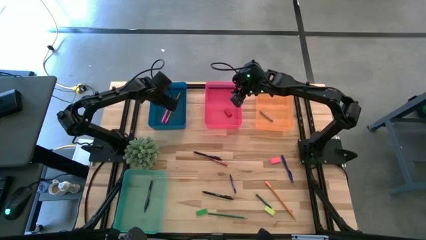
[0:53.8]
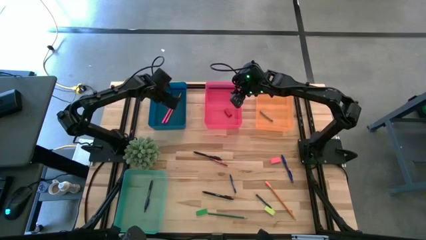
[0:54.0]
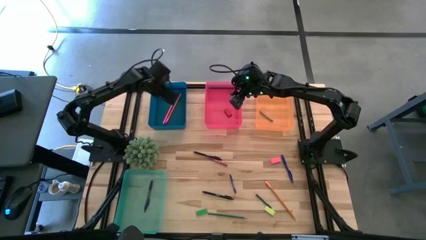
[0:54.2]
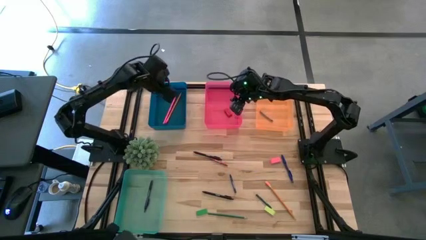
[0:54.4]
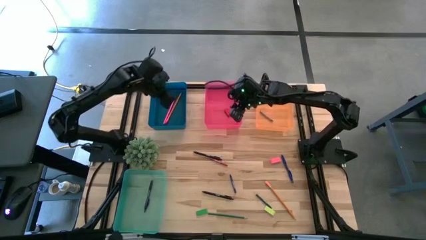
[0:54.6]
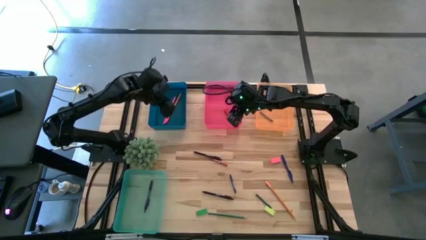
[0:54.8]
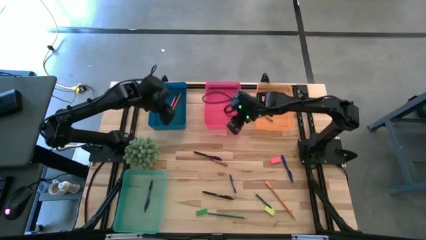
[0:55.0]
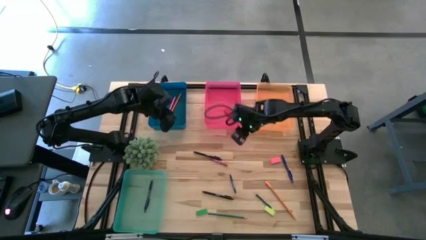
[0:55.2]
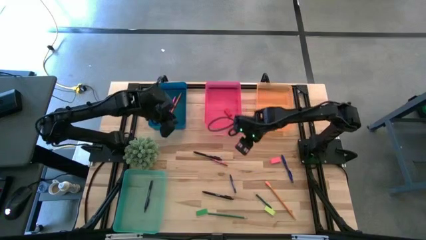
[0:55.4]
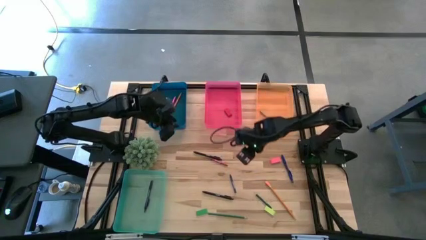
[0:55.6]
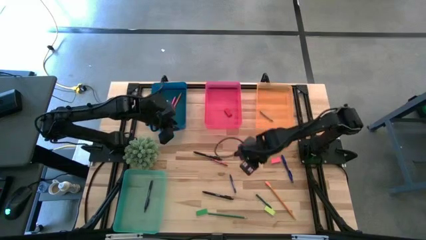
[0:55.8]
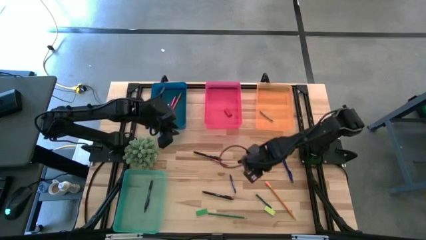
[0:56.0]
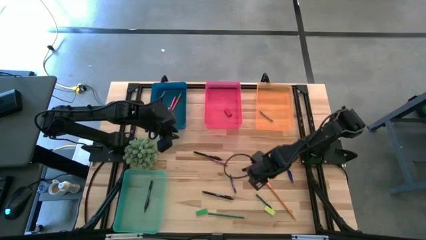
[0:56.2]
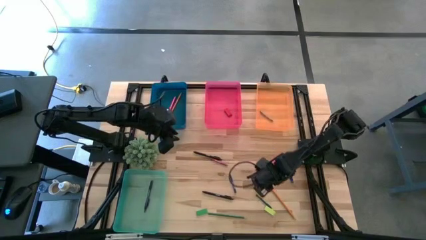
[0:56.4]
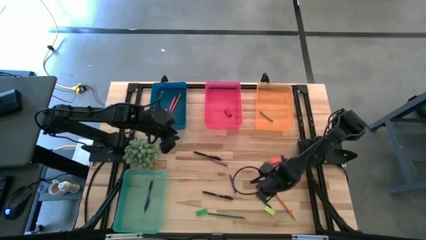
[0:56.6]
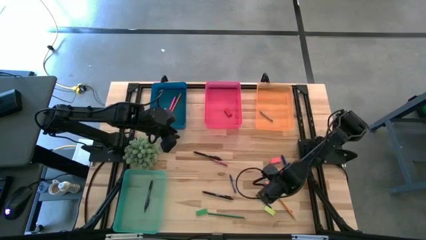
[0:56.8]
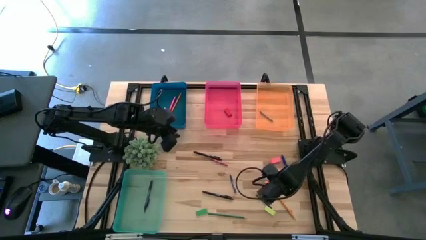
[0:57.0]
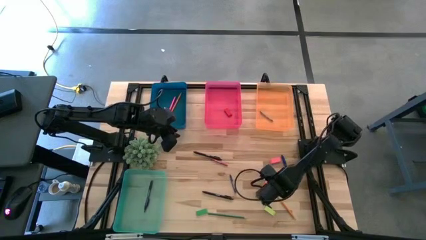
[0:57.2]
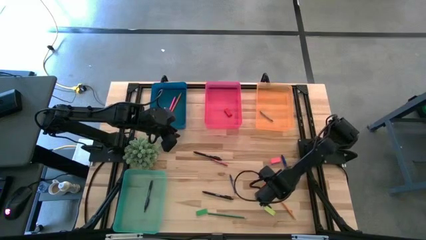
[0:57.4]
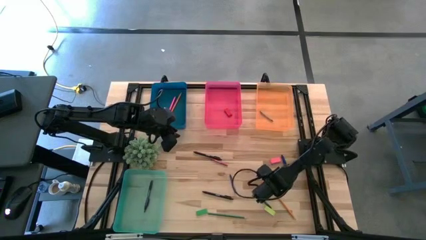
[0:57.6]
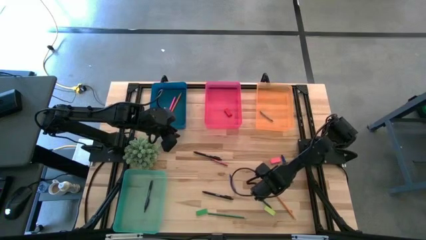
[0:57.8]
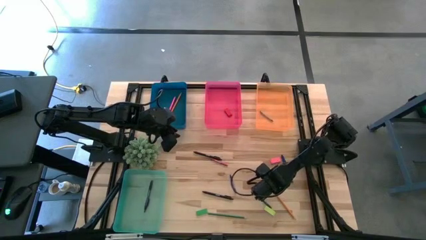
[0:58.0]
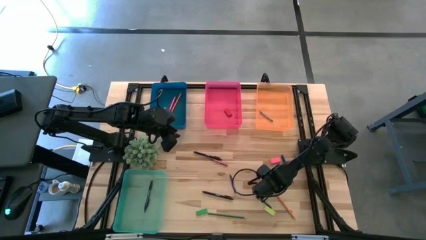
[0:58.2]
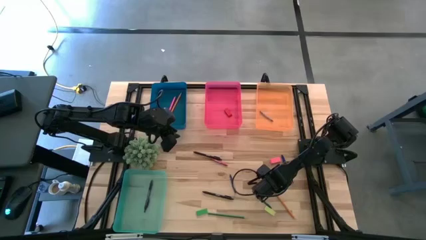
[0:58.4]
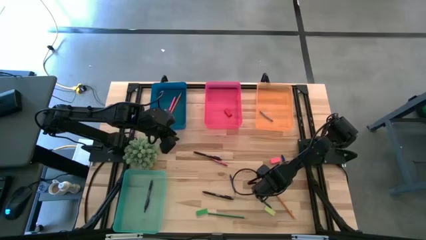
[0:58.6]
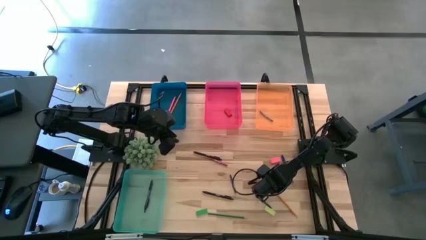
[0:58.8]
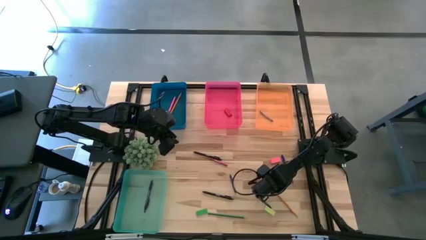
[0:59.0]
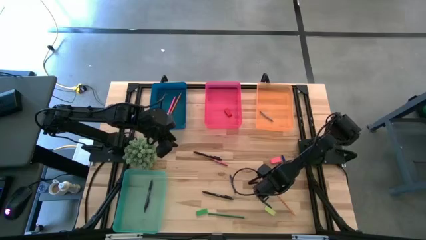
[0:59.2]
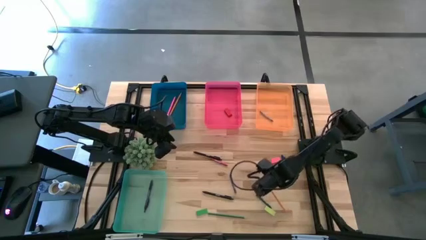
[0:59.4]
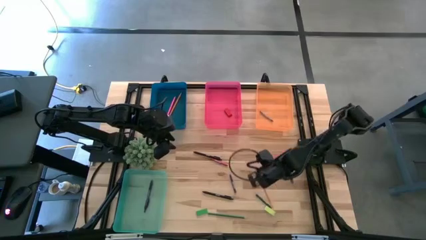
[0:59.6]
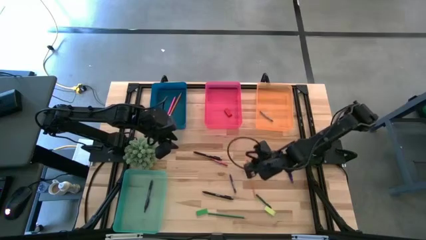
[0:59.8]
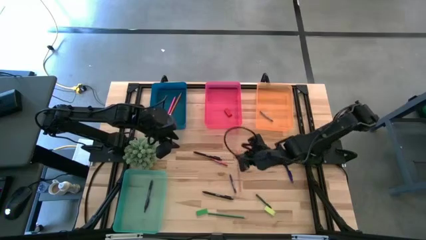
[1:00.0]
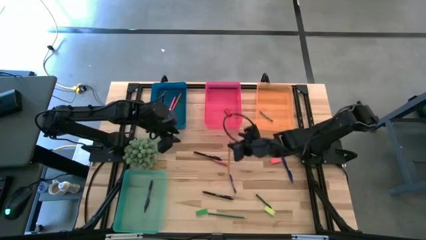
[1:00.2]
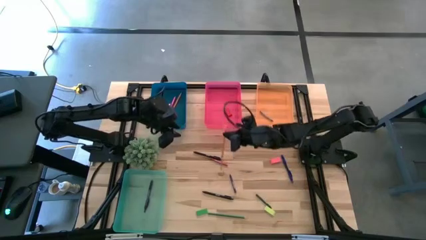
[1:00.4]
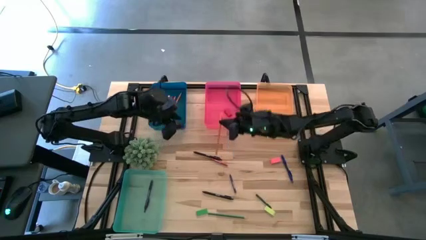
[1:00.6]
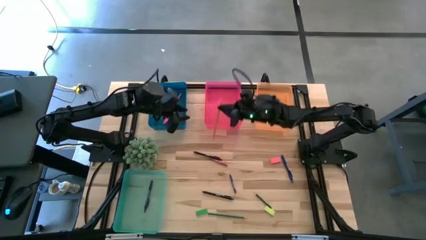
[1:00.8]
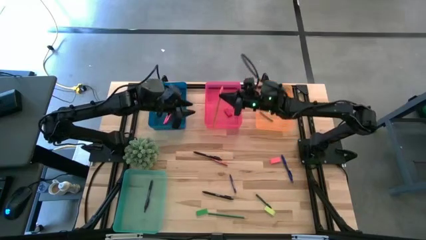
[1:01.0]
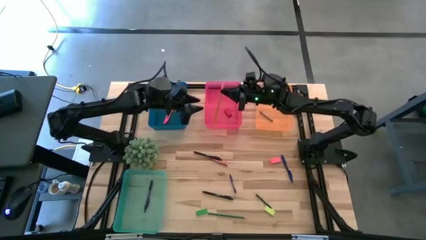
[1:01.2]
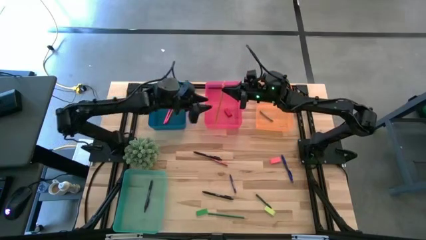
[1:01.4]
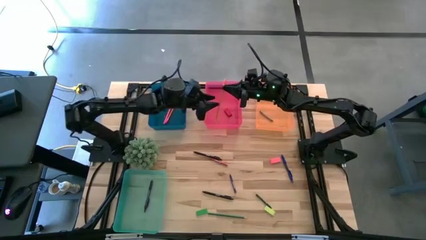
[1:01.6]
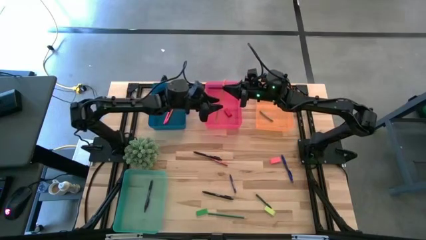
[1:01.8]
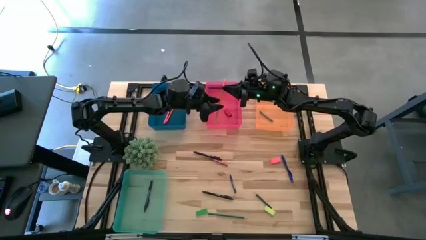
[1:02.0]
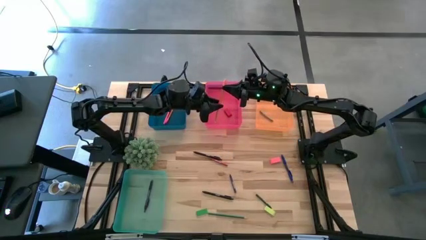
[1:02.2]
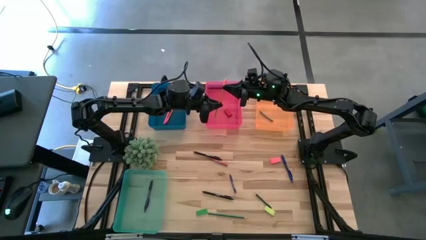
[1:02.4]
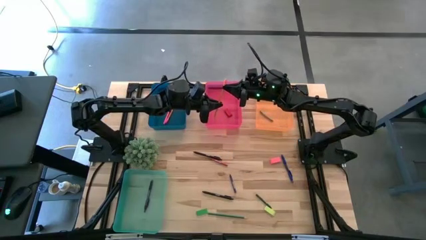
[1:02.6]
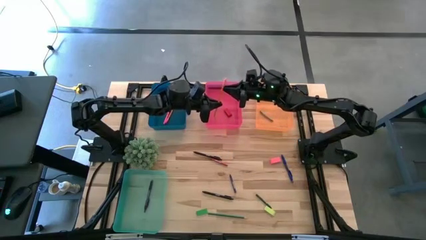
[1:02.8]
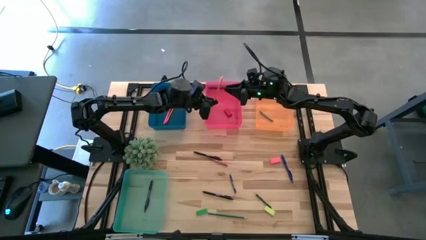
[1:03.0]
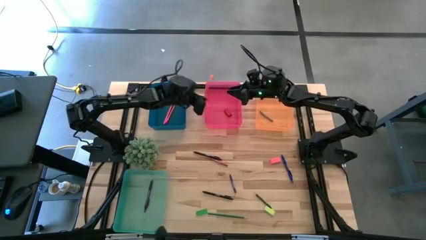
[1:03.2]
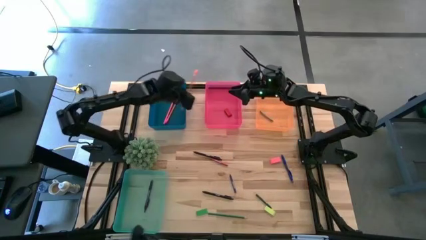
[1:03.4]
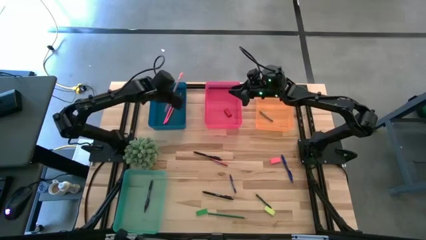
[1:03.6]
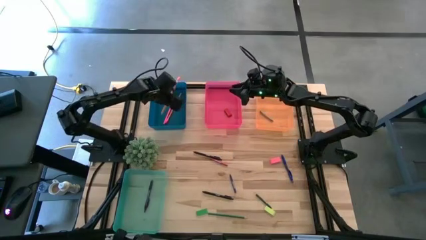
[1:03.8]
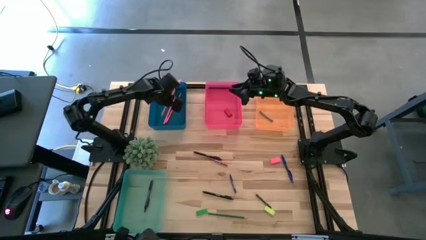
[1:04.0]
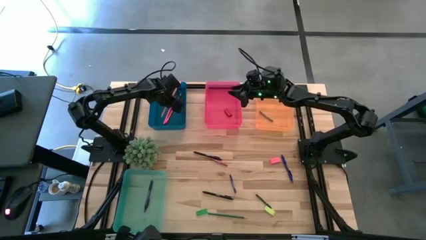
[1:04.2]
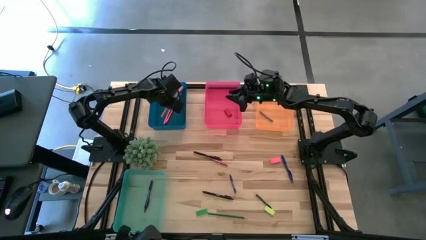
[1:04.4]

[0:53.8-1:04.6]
Task: Sort crayons/erasers/pens/pencils in bins
Put the yellow pencil into the blue bin

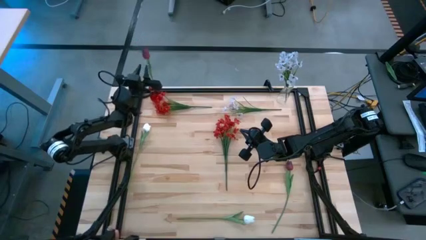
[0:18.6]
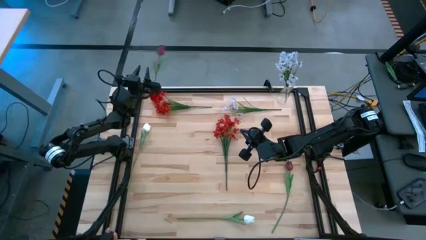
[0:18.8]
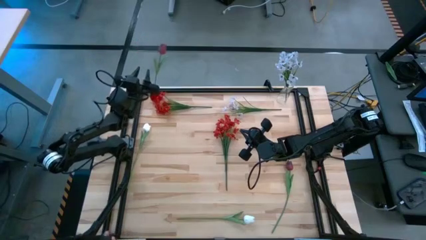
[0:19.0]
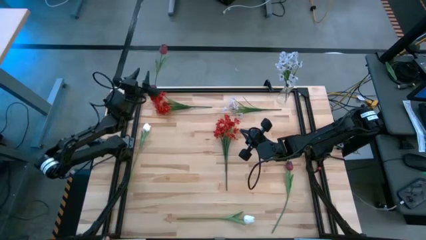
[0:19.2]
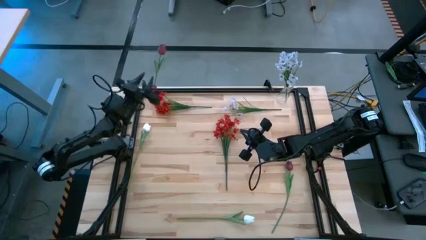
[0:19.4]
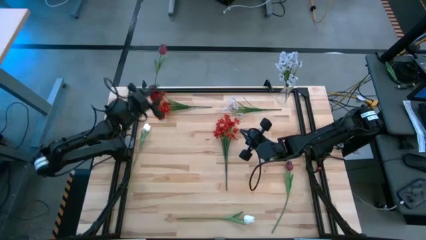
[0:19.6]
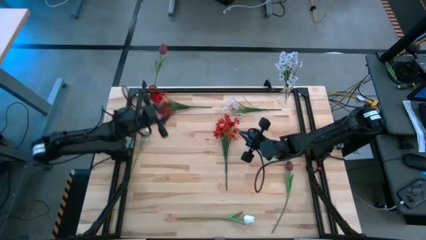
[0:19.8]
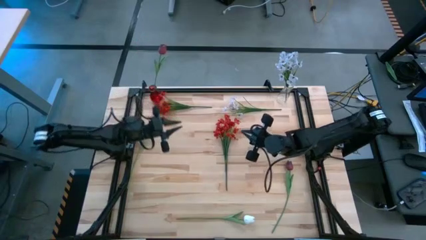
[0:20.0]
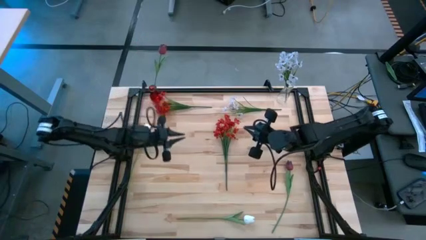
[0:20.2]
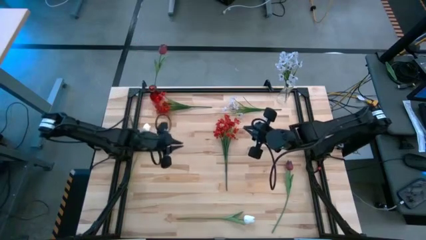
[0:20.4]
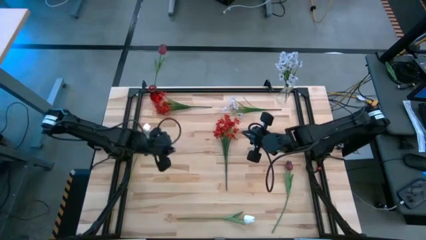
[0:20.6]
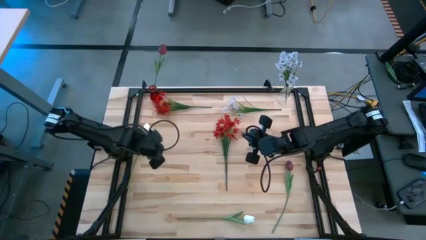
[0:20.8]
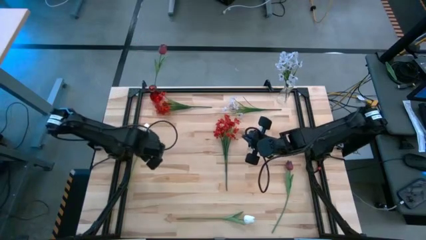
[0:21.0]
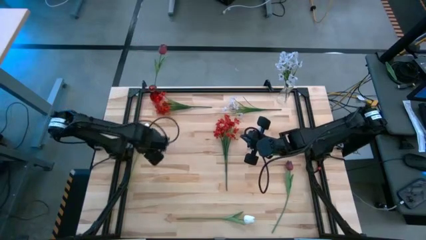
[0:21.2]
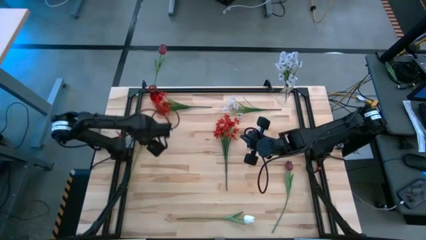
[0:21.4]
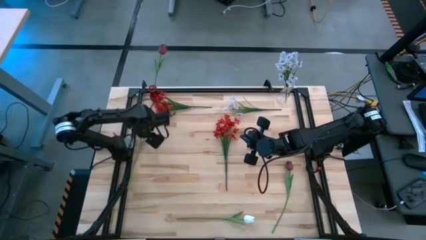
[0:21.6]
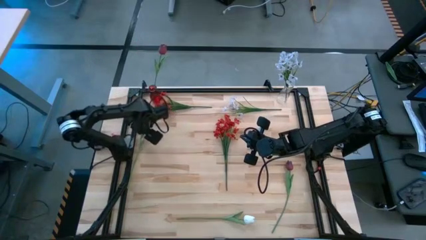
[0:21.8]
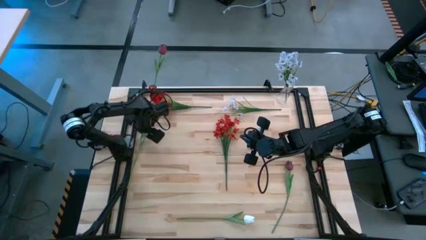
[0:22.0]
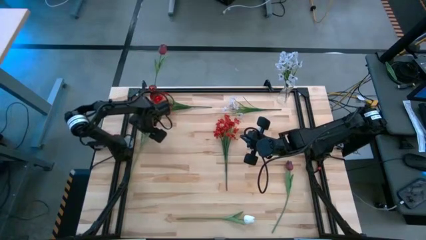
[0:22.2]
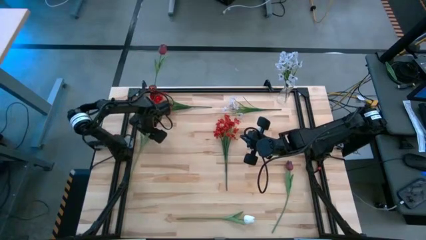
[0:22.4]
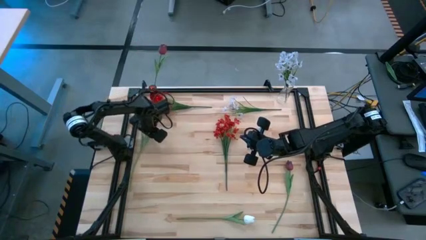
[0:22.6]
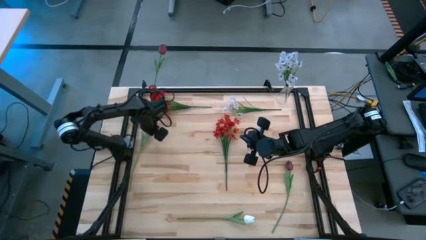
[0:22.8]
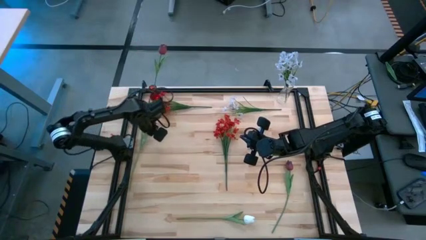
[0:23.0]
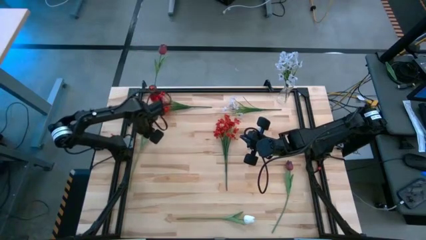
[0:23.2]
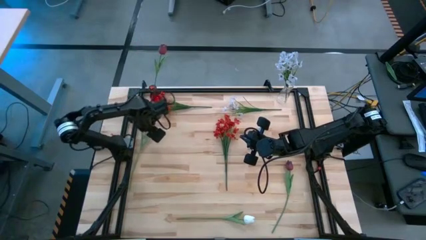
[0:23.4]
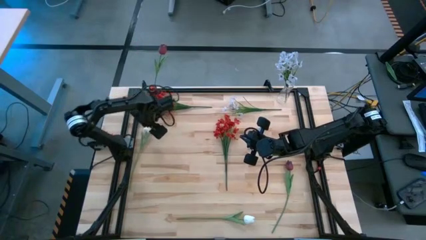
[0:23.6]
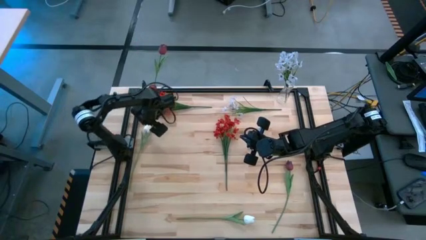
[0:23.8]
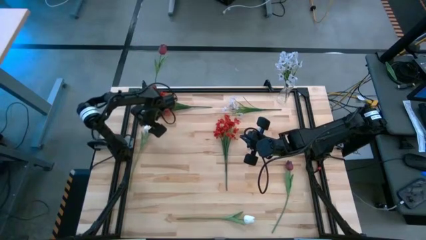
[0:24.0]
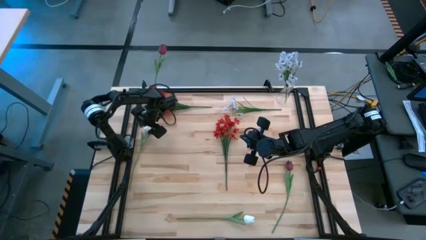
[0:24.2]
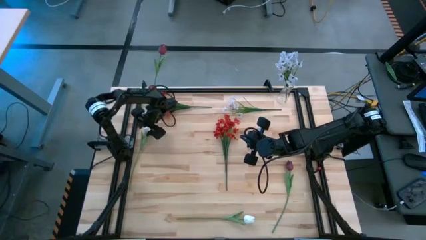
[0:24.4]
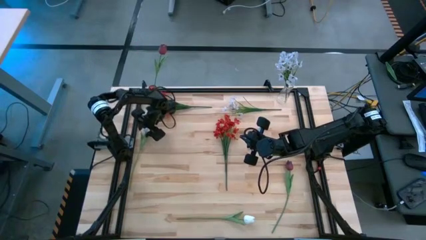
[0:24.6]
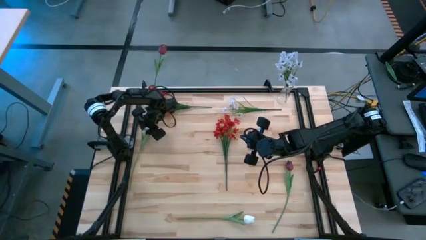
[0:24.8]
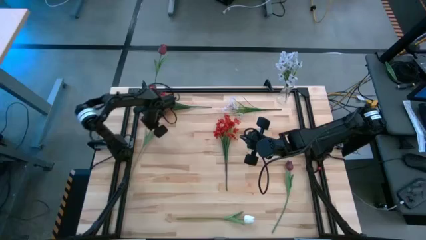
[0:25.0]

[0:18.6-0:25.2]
Task: Sort flowers into vase by color
Put the top white tulip into the transparent flower vase
